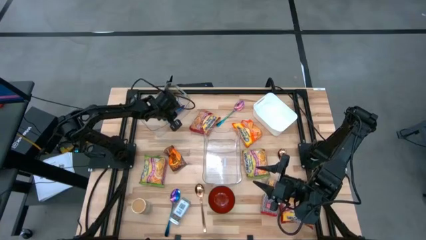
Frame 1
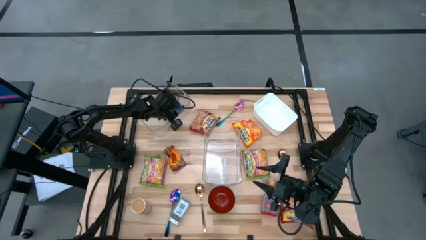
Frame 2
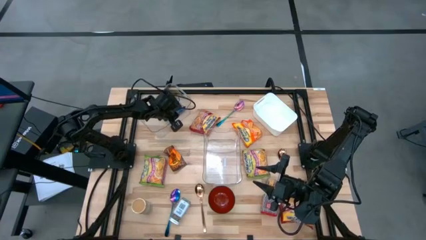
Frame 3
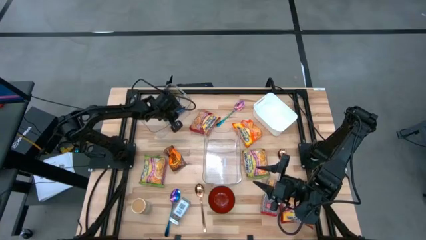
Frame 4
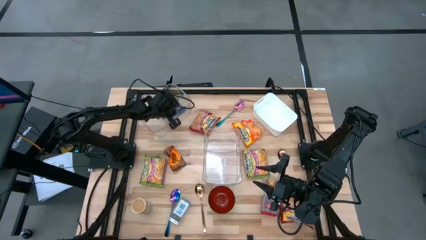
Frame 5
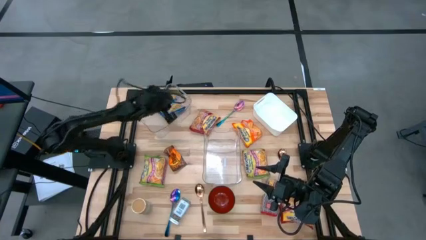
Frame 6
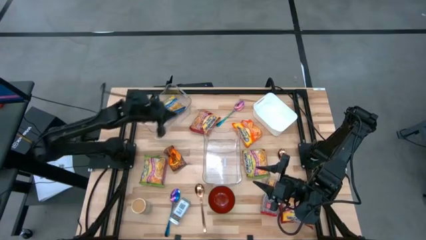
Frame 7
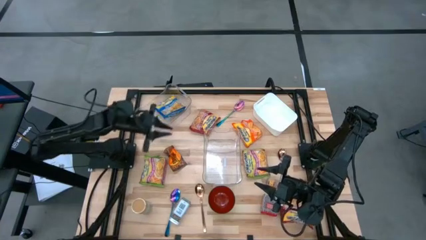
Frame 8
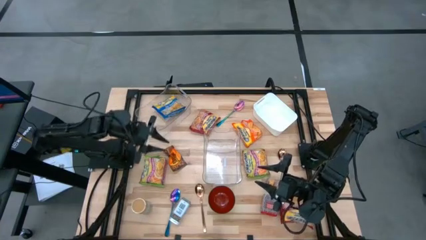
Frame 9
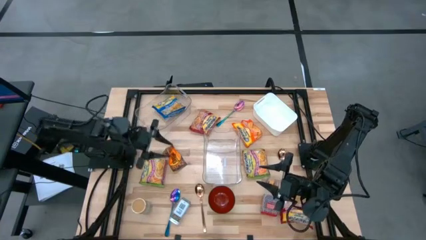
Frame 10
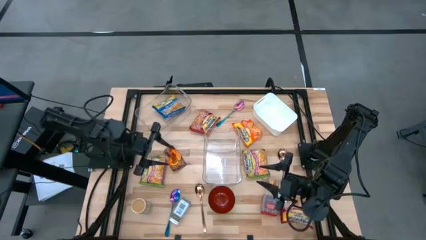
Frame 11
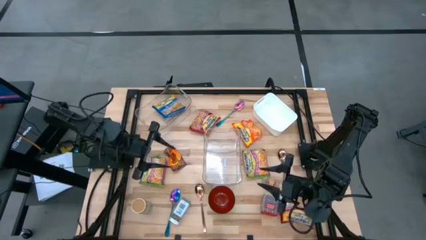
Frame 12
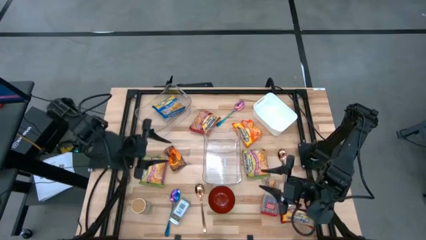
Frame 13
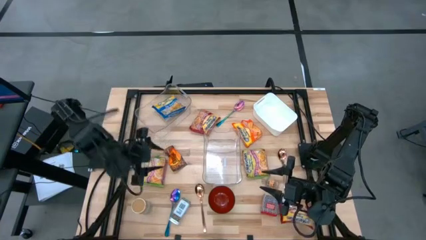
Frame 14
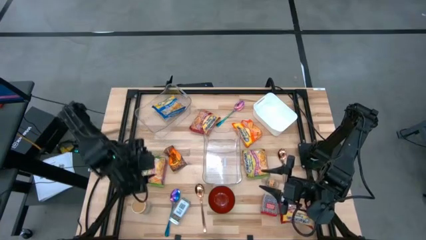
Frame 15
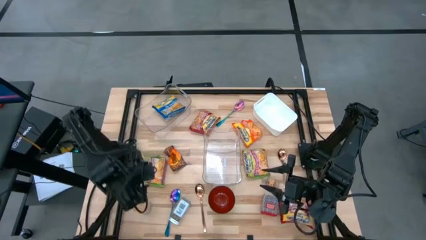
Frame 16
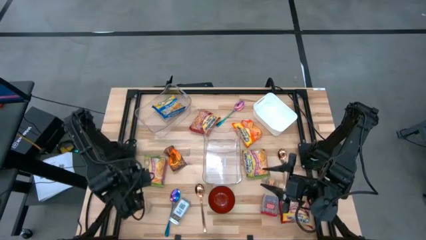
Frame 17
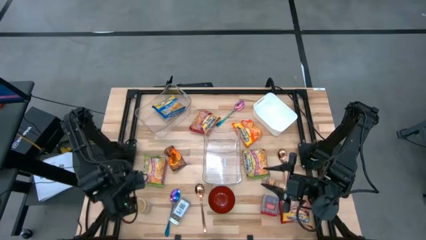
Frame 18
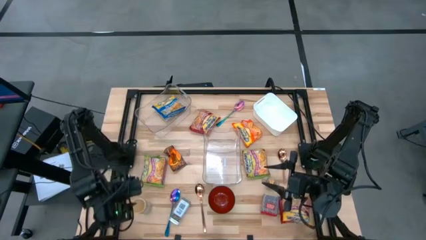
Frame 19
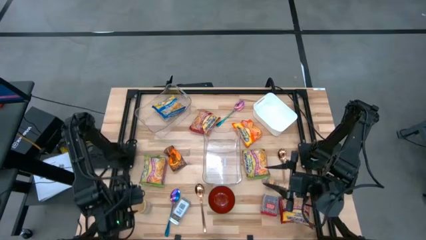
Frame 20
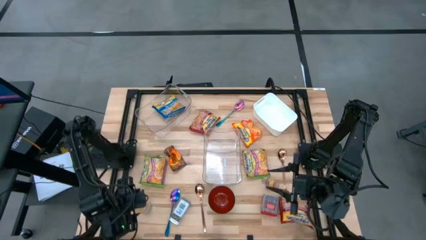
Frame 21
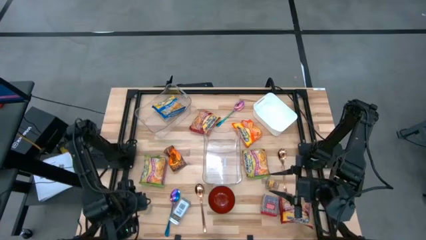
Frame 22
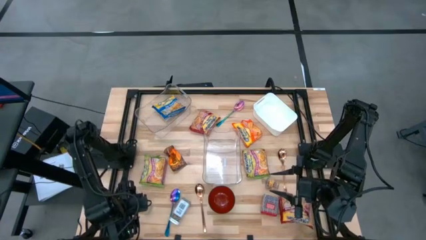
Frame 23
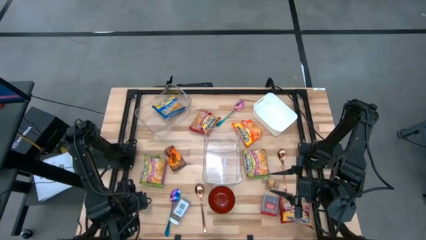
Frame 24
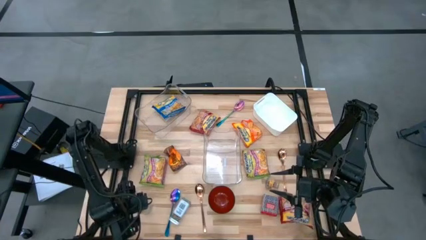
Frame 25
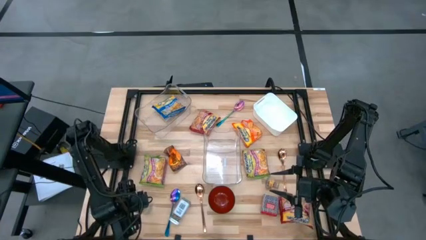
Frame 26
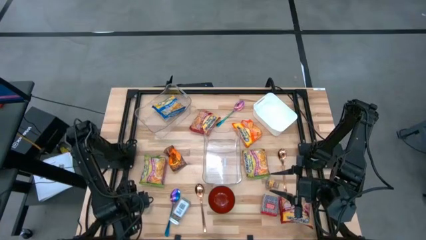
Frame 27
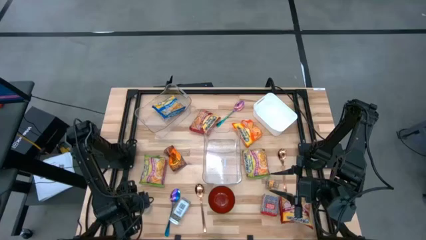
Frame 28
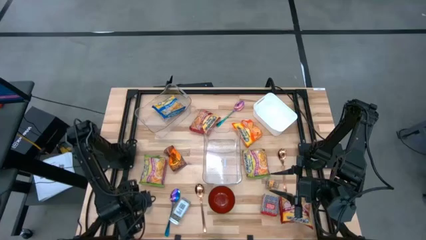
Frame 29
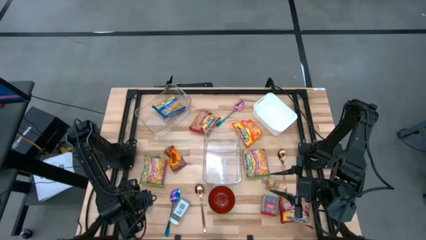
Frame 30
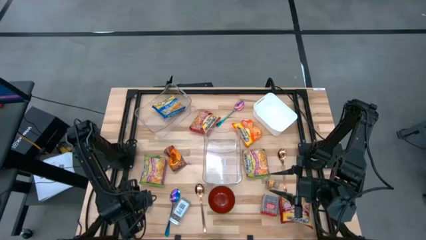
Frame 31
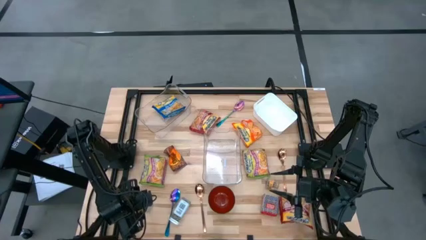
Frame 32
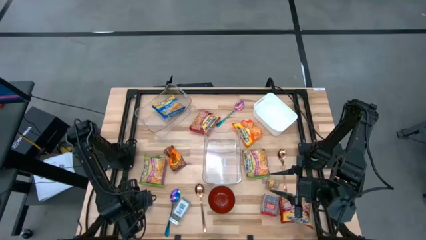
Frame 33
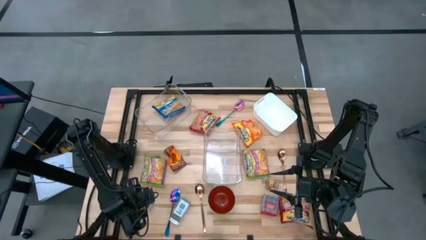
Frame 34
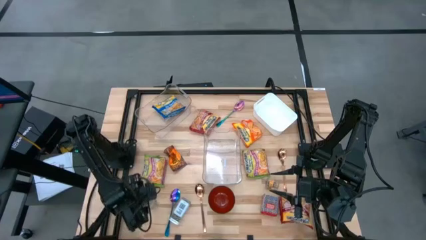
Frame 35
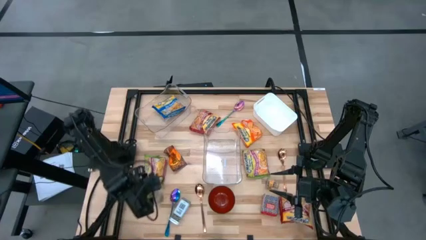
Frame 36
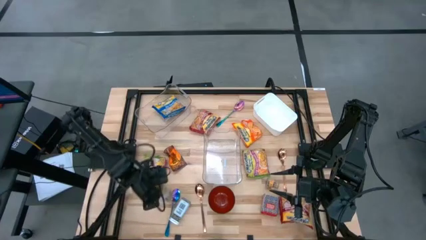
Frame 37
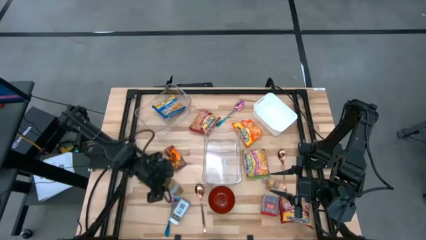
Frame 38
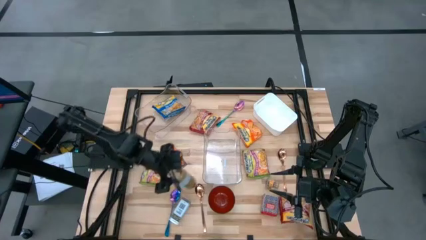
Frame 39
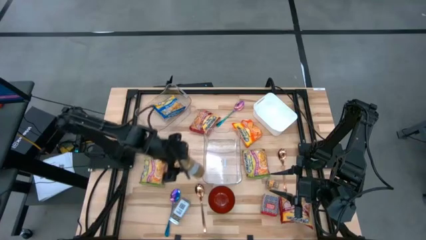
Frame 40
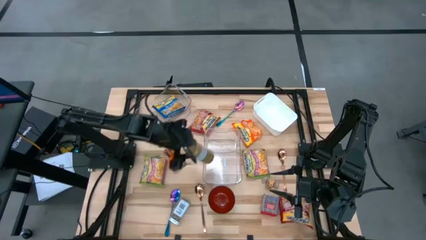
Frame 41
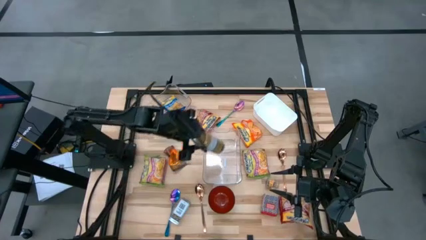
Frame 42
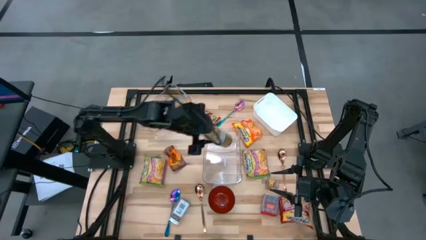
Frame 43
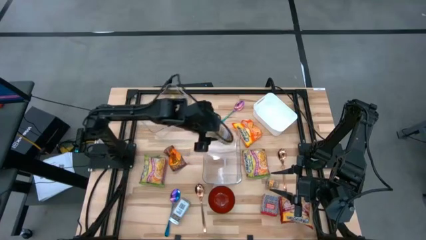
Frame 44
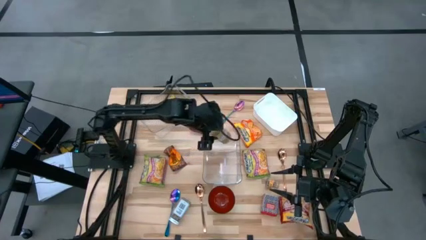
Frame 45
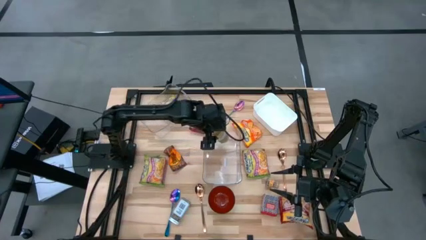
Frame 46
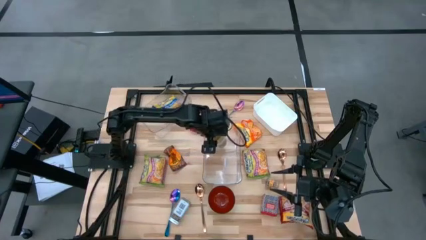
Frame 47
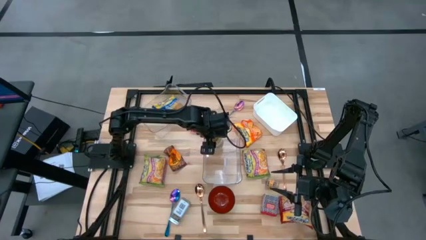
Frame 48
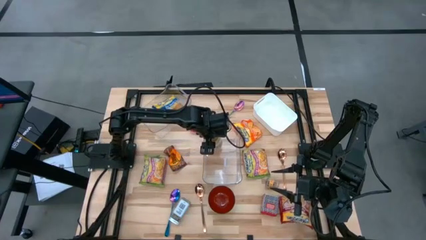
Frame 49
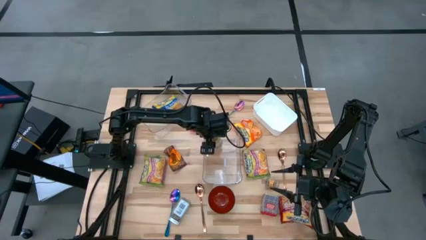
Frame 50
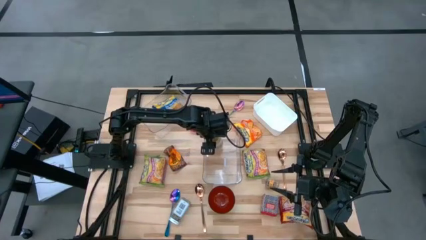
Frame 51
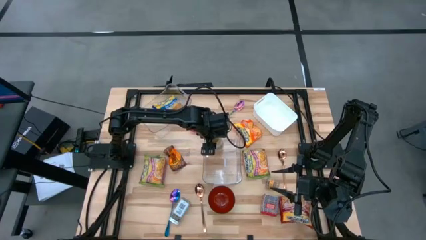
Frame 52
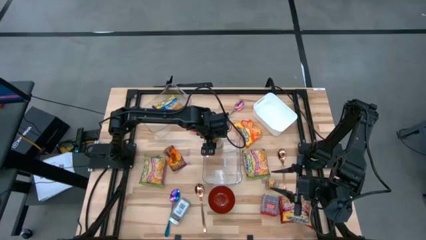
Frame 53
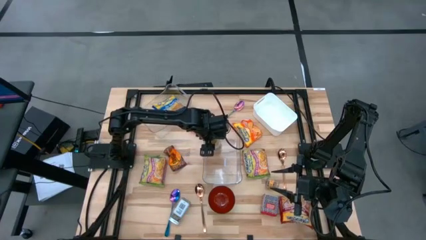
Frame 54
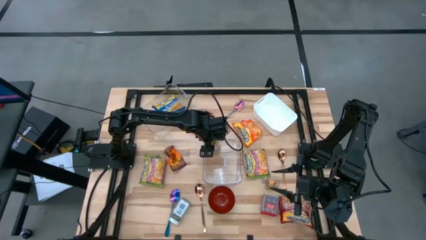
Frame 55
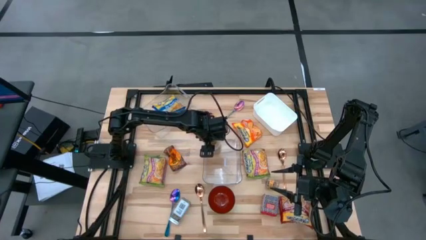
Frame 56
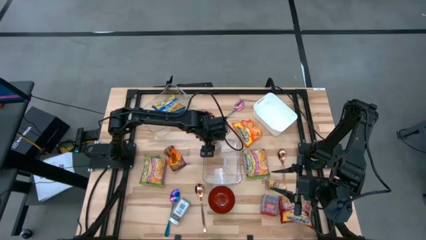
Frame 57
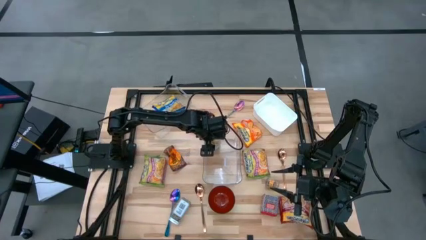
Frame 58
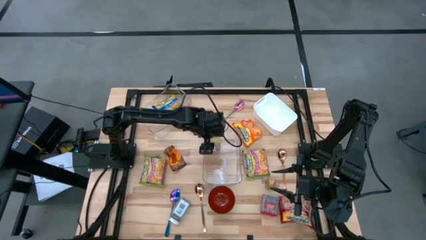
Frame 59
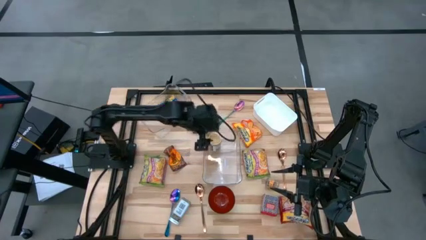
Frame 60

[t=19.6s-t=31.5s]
Task: Pick & Place Food Item
Put the gold spice bottle into the bottom transparent bin
